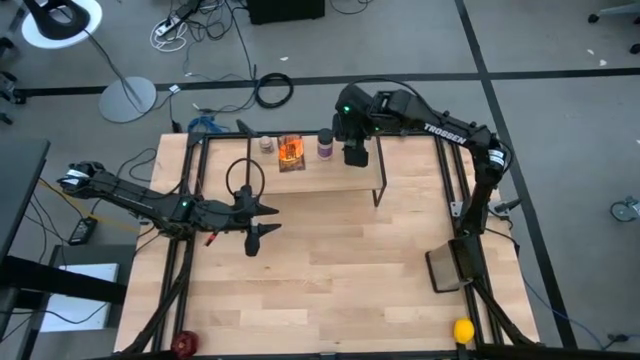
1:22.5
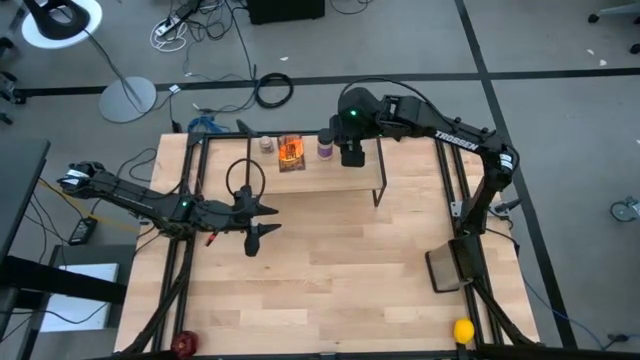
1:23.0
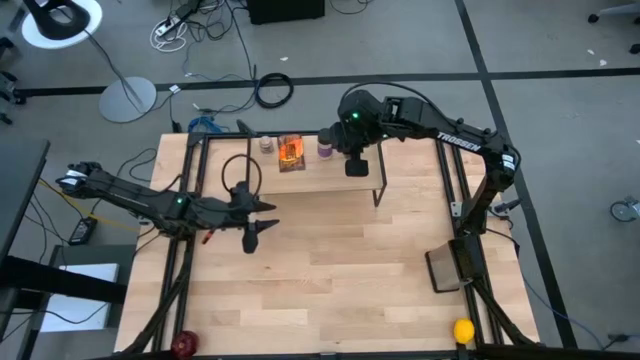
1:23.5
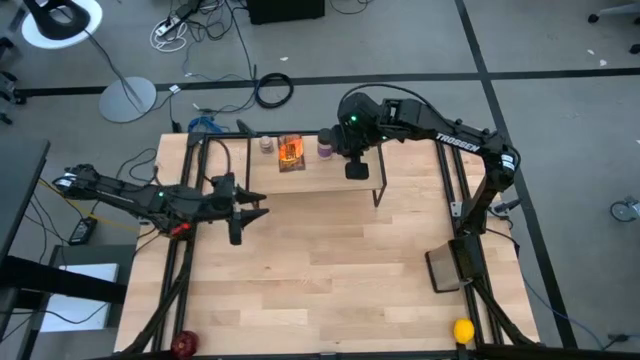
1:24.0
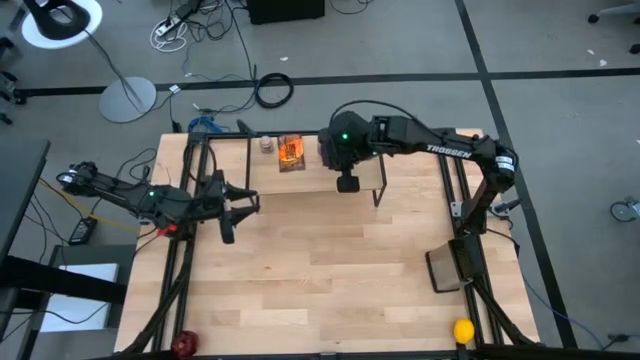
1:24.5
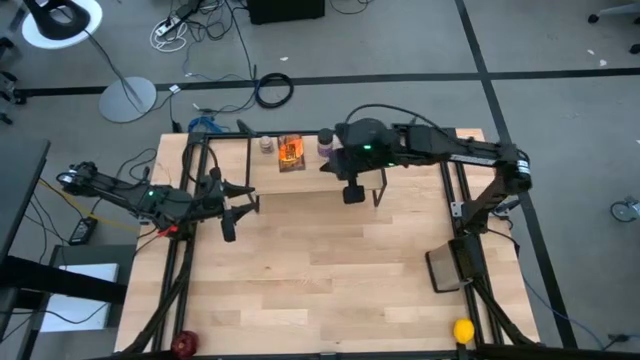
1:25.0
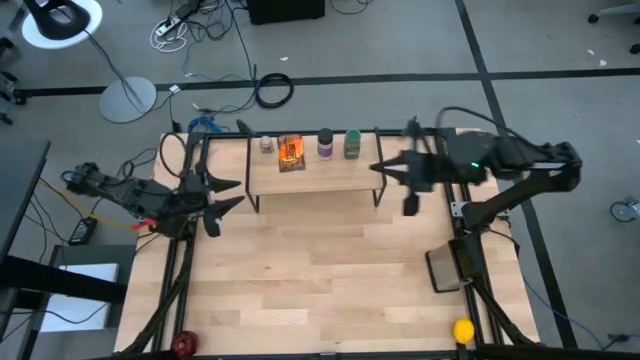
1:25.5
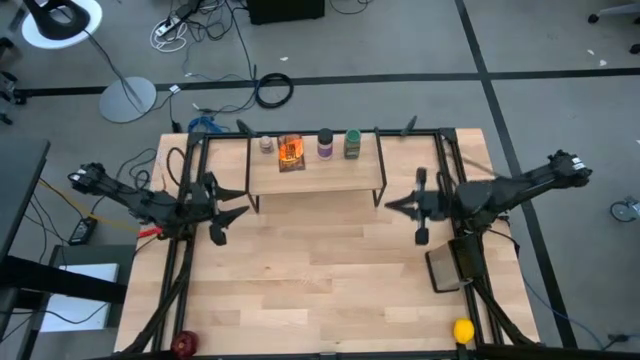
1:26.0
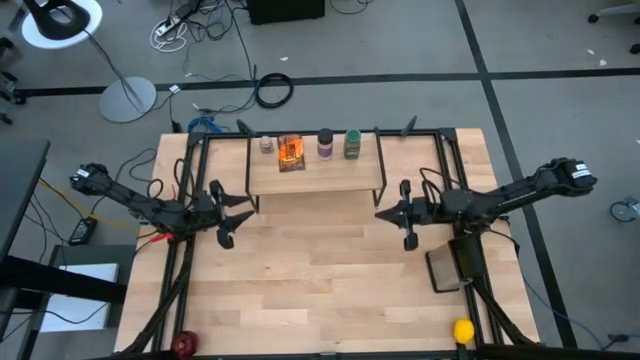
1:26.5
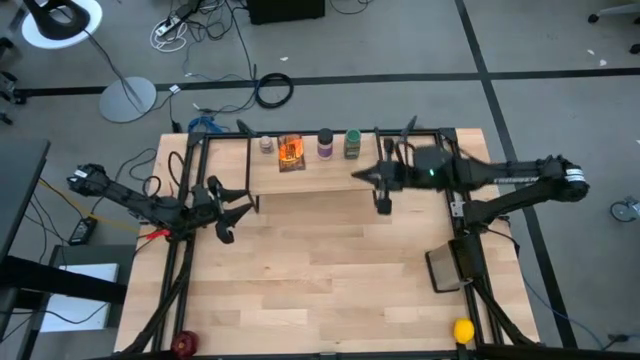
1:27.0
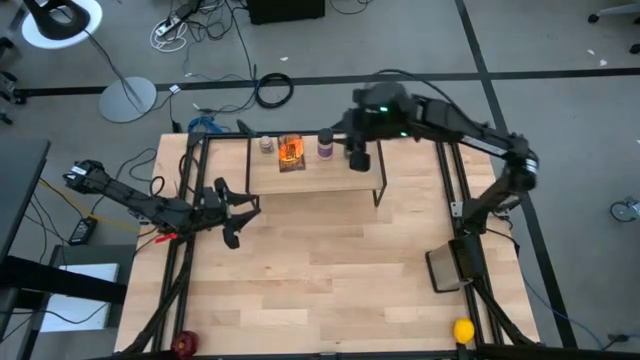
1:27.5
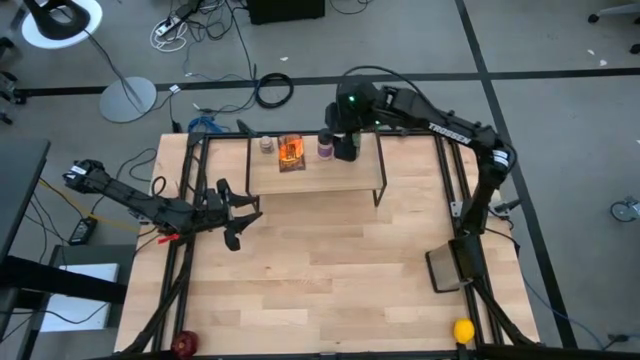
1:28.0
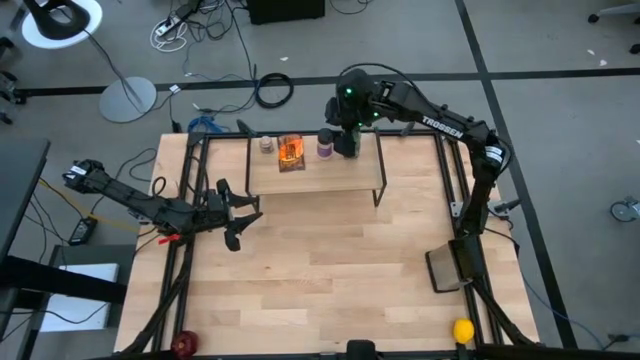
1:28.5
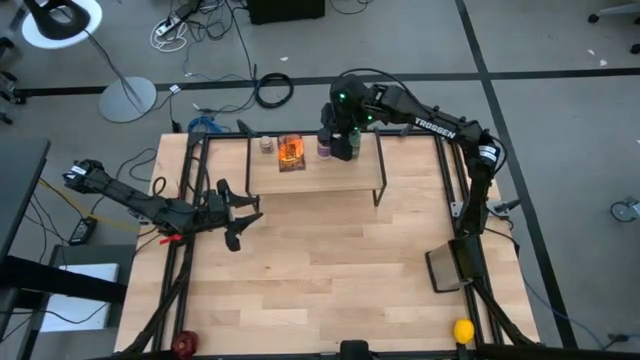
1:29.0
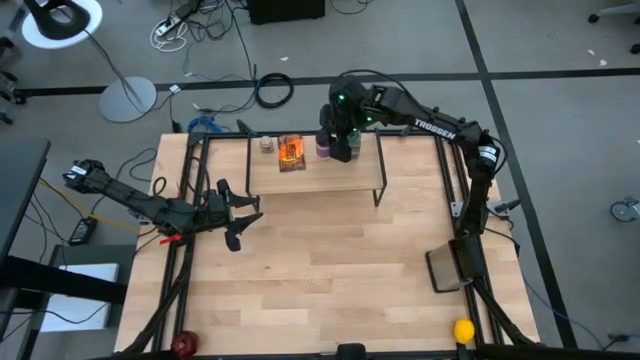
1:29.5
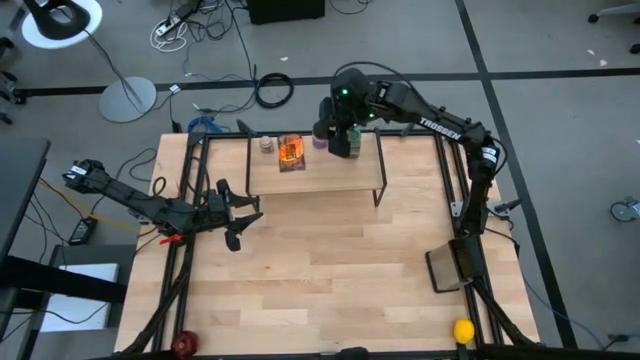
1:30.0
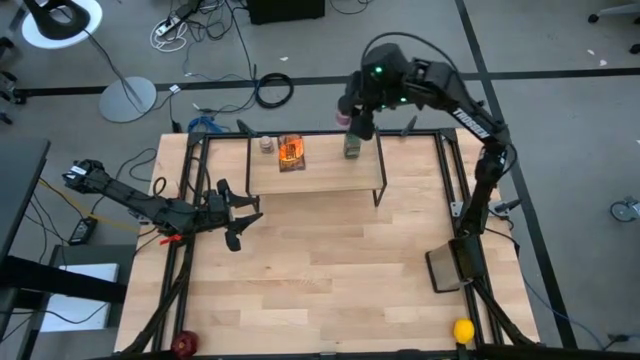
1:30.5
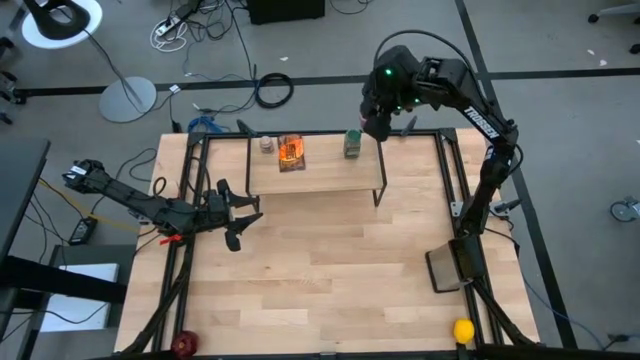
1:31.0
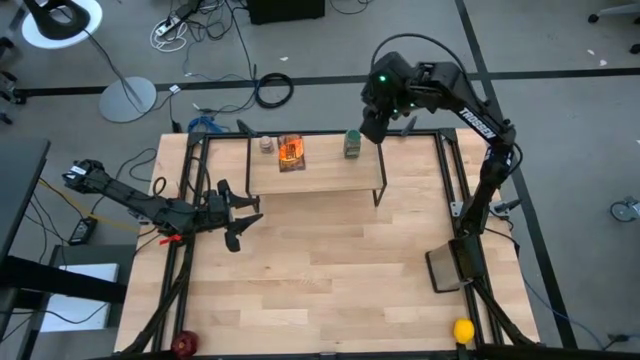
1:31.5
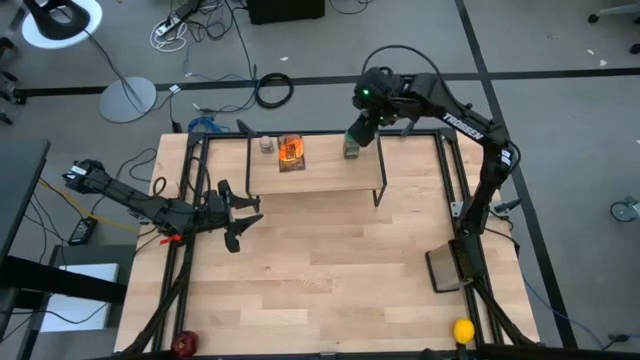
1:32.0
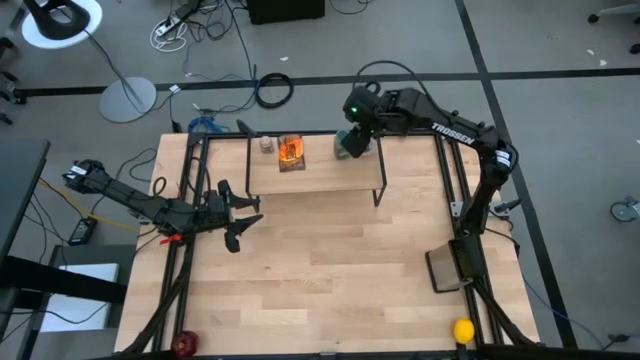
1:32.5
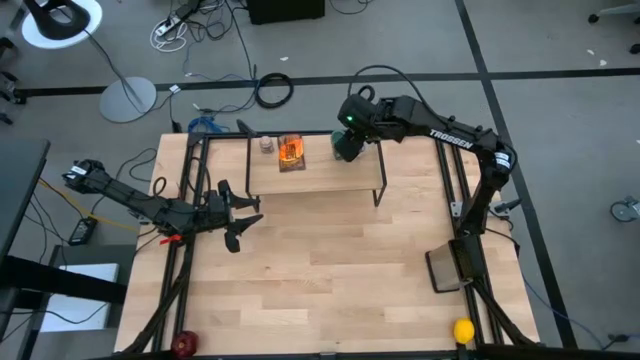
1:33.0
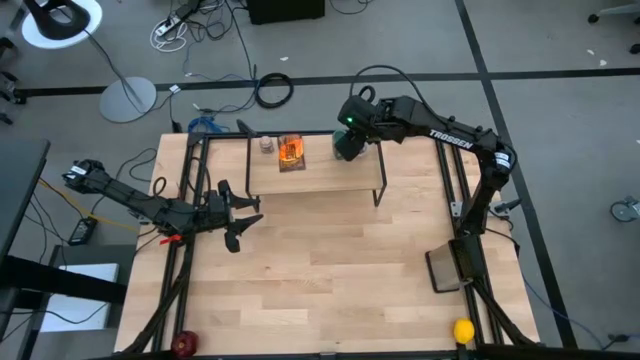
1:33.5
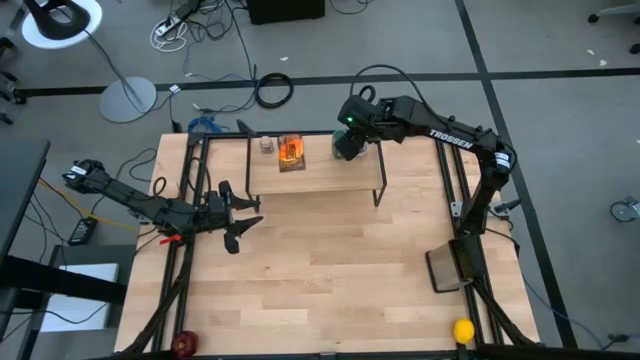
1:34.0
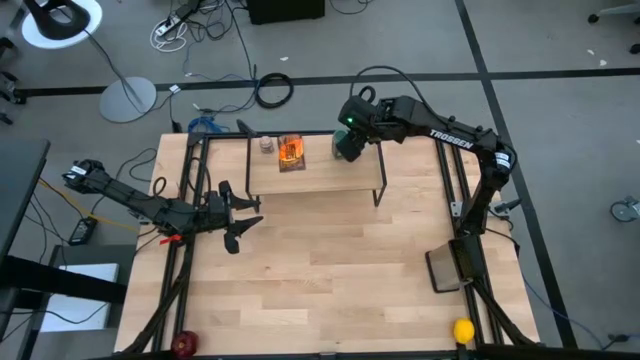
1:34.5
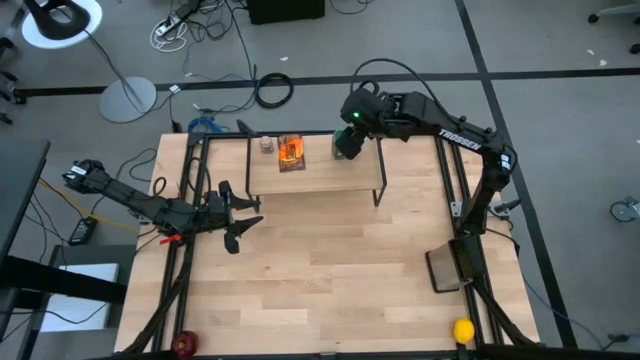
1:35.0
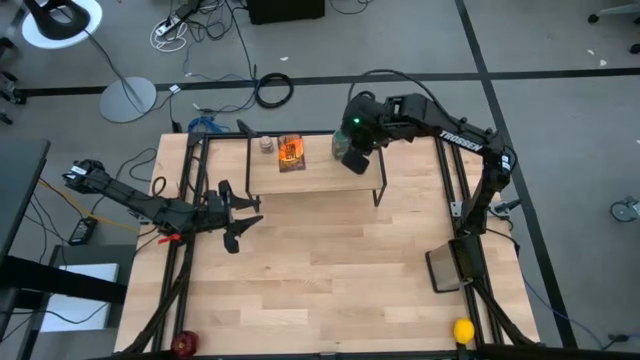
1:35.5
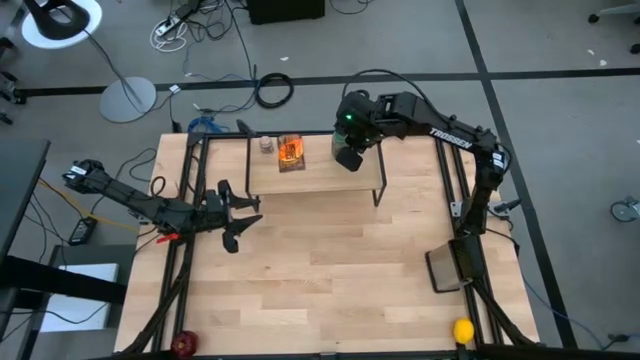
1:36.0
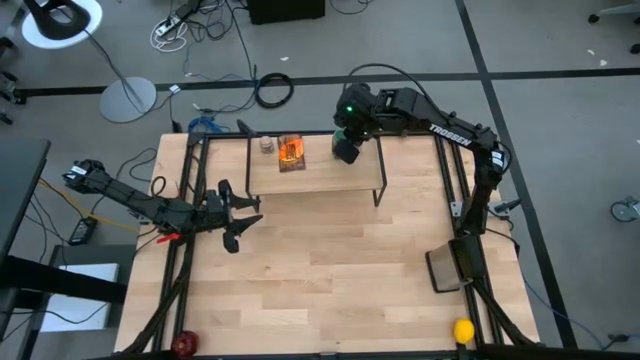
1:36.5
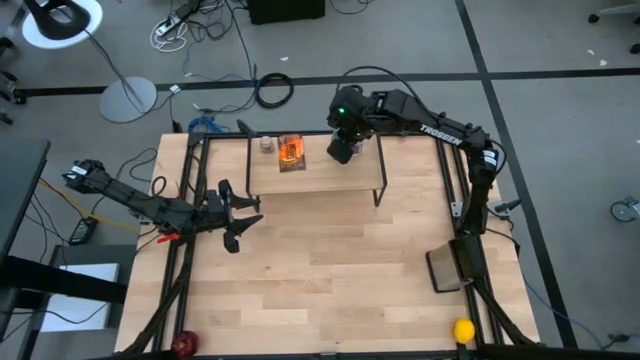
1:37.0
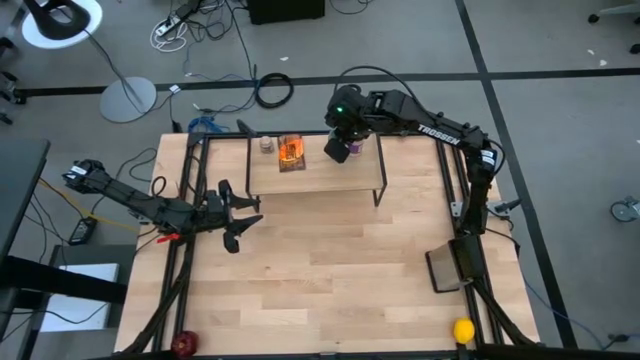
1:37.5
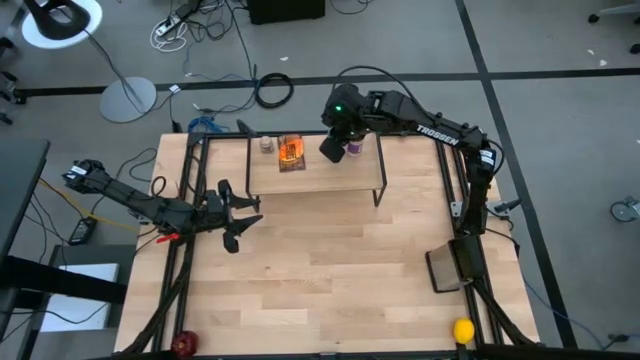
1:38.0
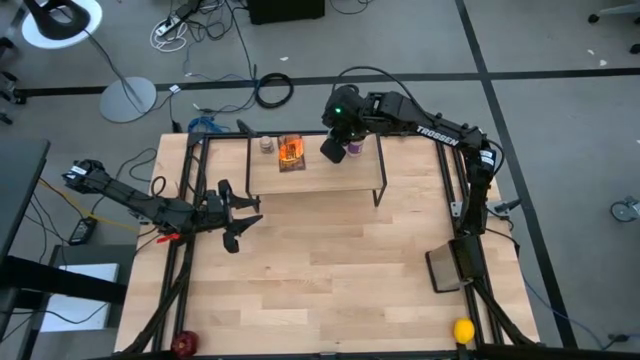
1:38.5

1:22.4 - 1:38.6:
Task: Shelf spices
Adjust the seasoning bottles on the shelf

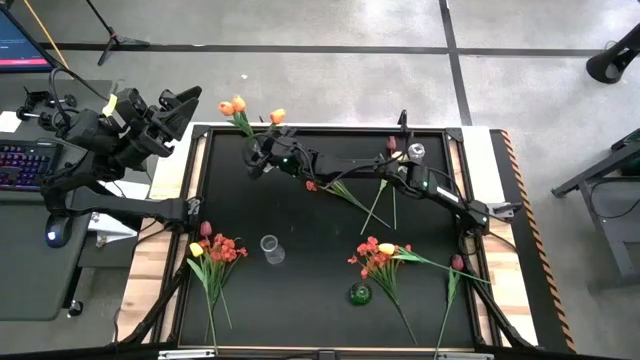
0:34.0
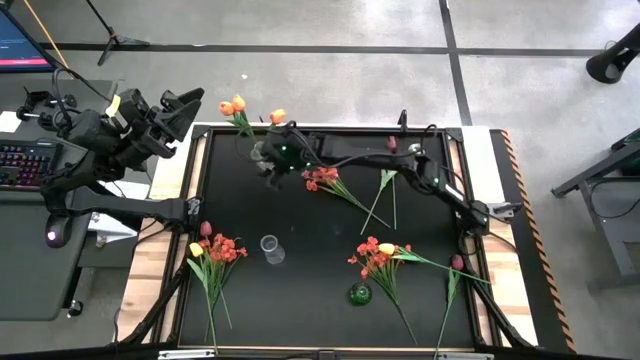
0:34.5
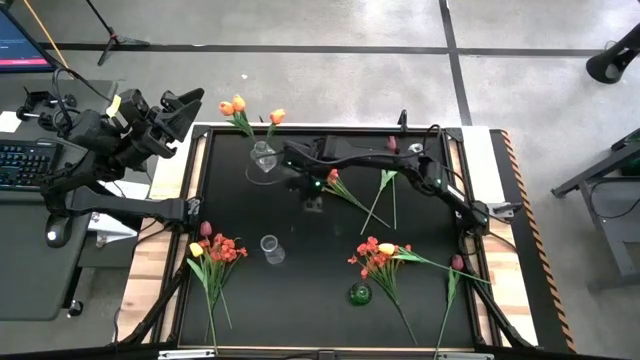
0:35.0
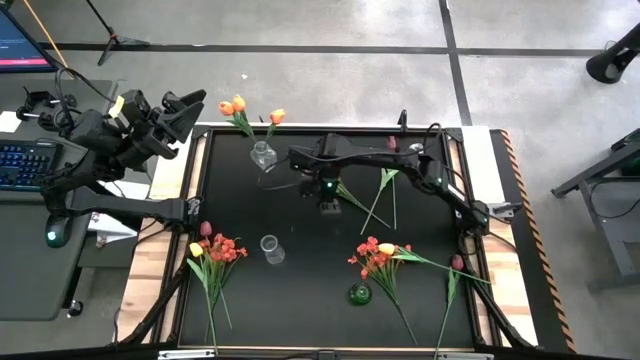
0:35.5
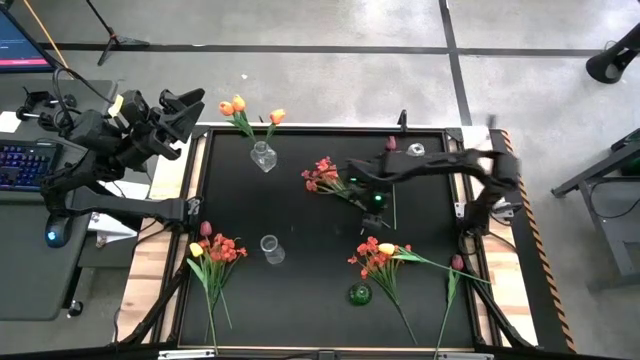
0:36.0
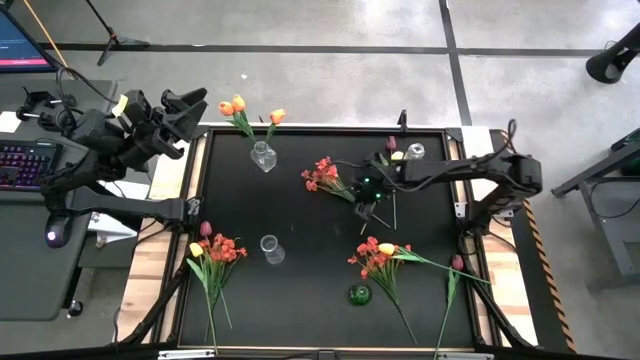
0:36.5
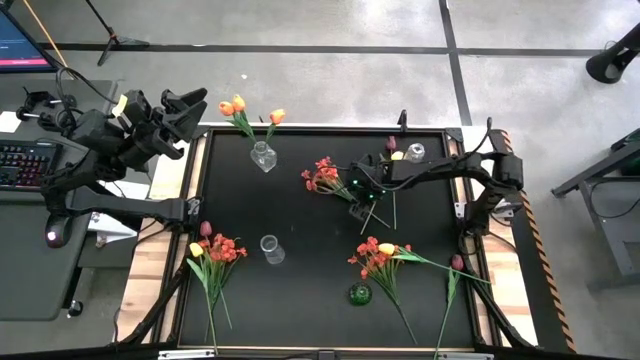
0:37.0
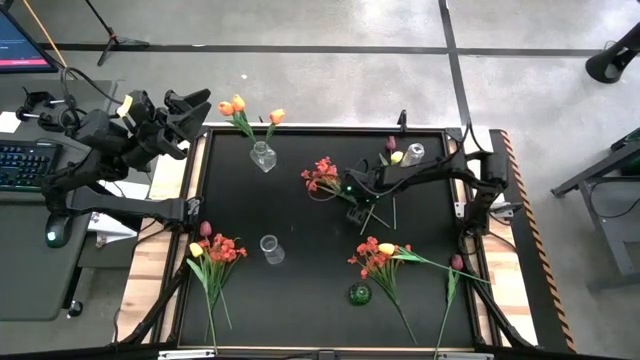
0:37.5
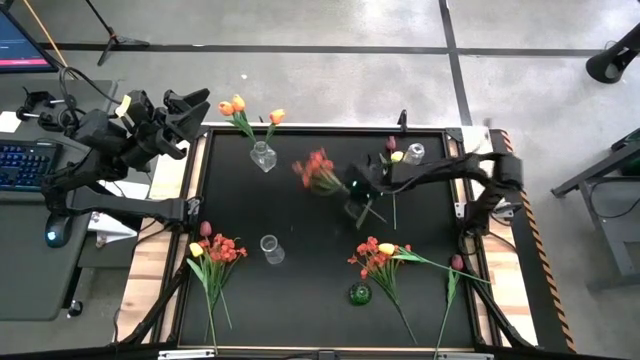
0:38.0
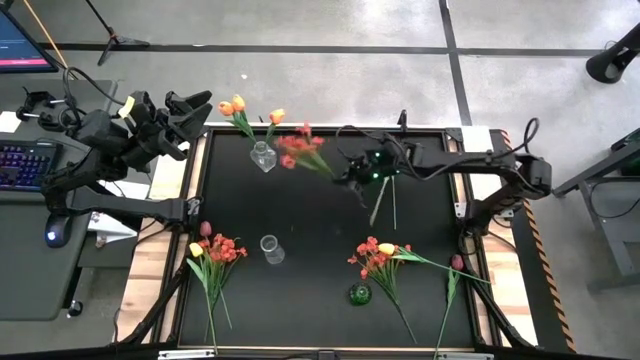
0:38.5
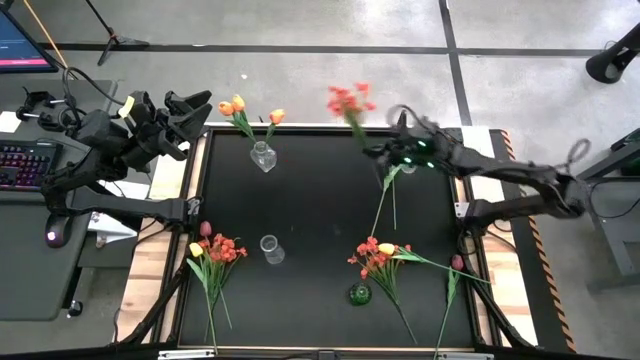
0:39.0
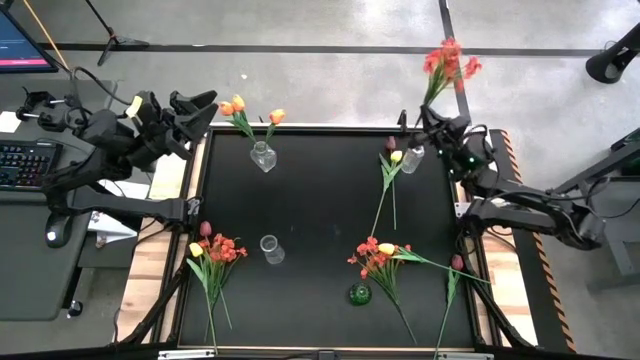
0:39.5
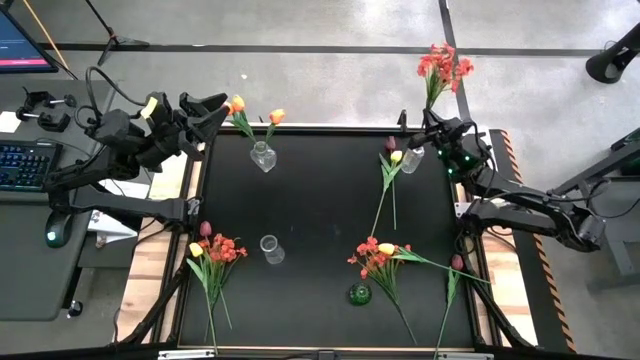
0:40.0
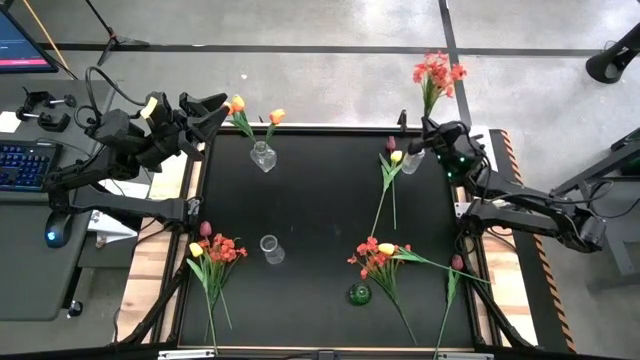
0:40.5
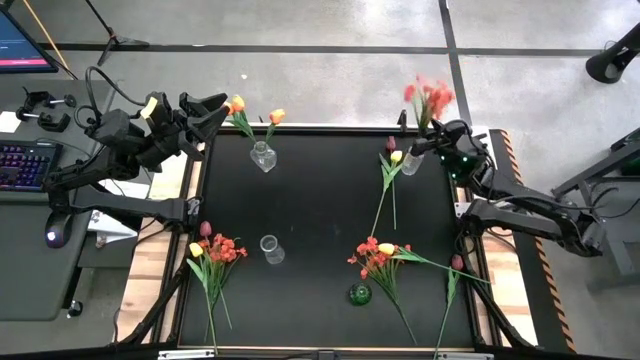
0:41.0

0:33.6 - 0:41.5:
Task: Sort flowers into vase by color
Put the top red flowers into the top right transparent vase
